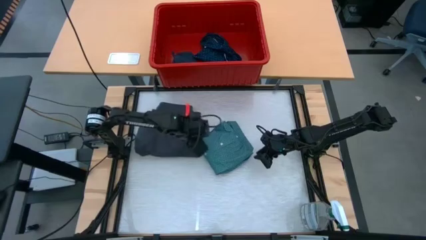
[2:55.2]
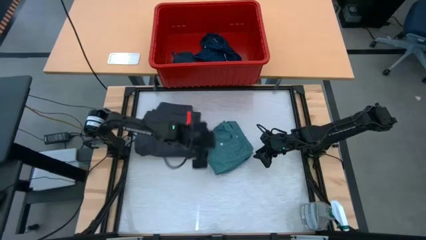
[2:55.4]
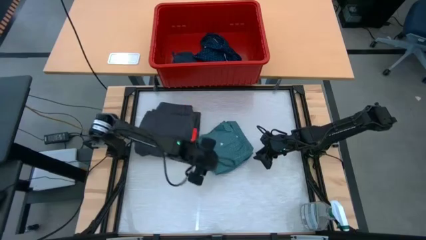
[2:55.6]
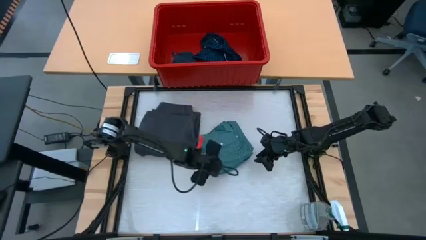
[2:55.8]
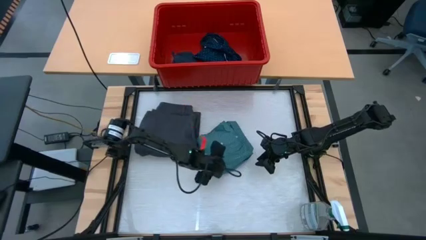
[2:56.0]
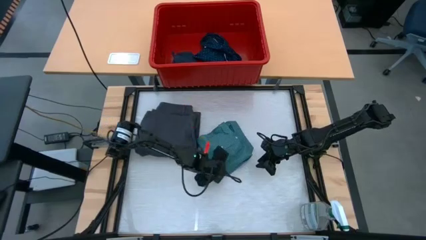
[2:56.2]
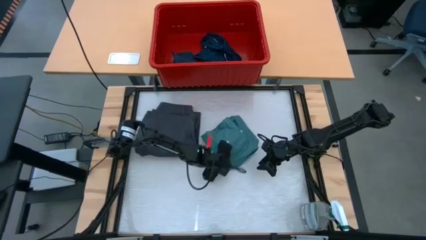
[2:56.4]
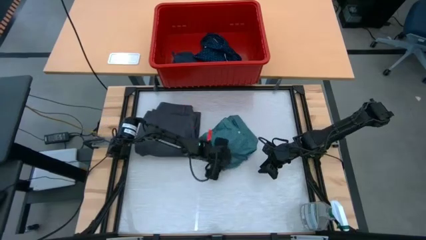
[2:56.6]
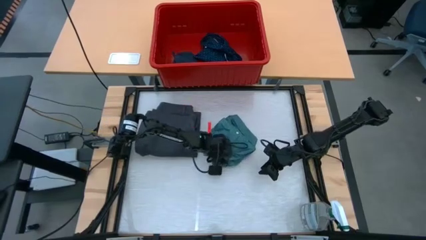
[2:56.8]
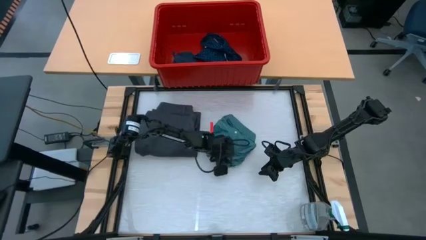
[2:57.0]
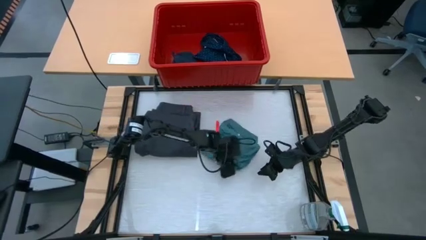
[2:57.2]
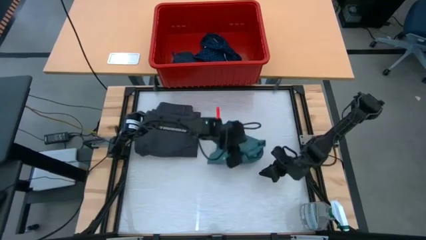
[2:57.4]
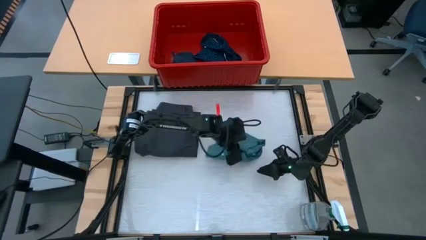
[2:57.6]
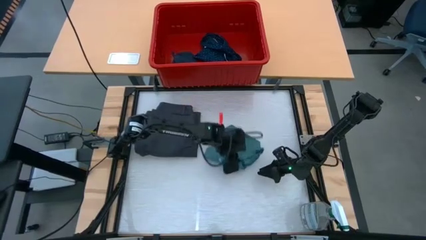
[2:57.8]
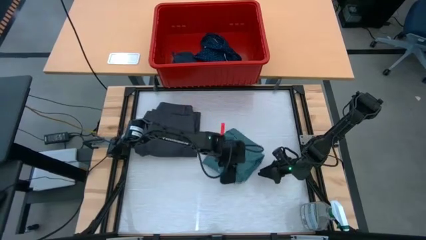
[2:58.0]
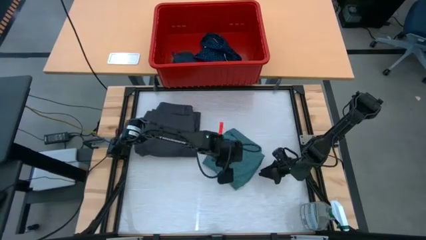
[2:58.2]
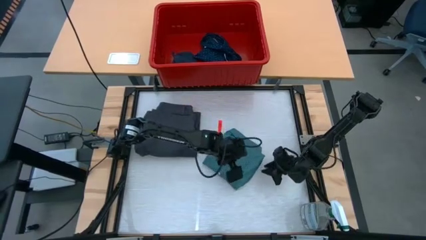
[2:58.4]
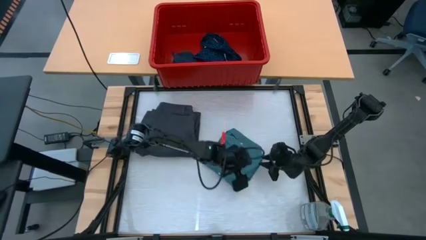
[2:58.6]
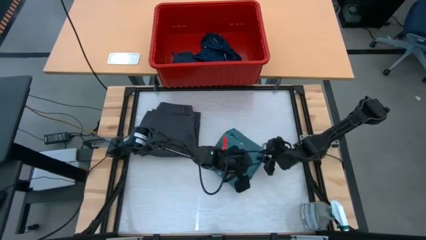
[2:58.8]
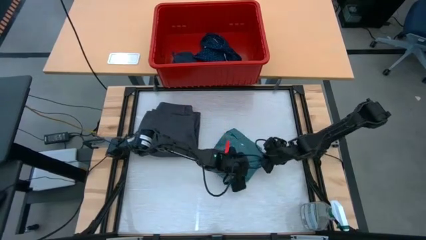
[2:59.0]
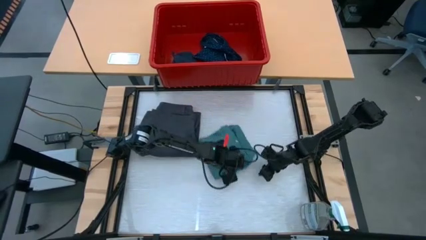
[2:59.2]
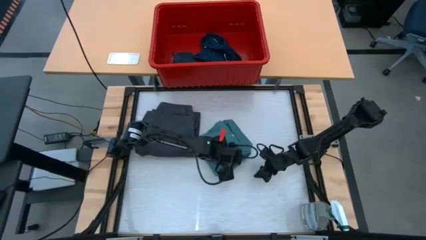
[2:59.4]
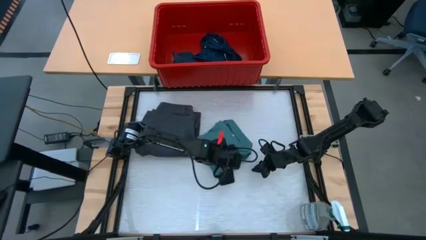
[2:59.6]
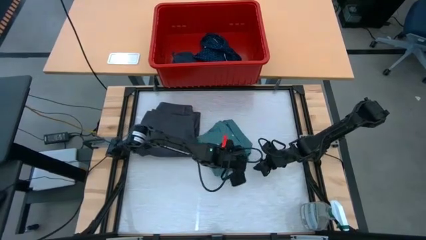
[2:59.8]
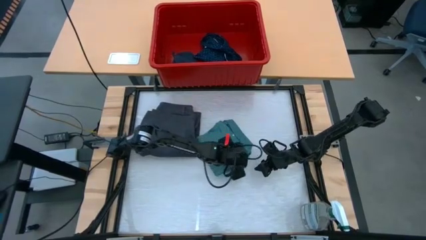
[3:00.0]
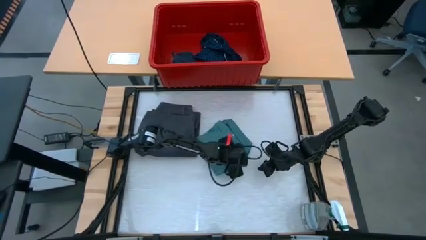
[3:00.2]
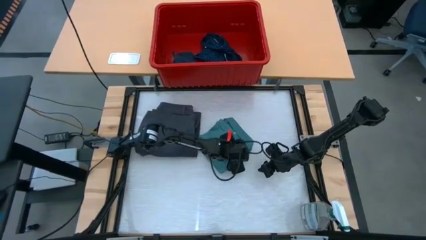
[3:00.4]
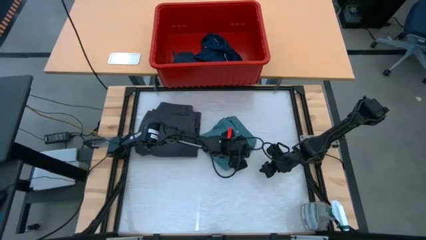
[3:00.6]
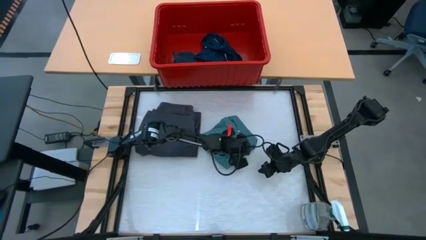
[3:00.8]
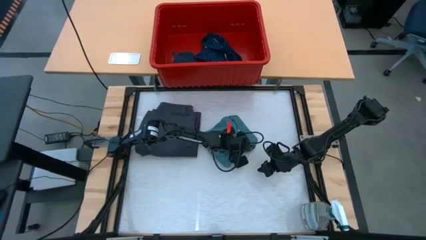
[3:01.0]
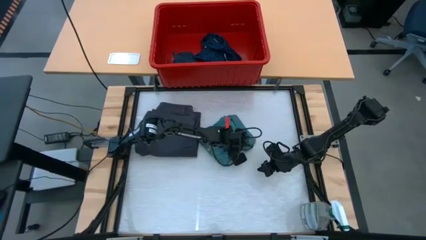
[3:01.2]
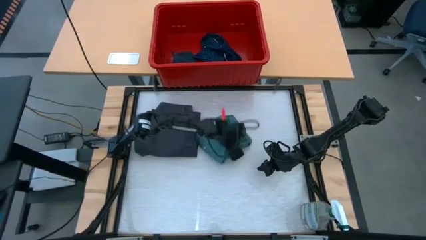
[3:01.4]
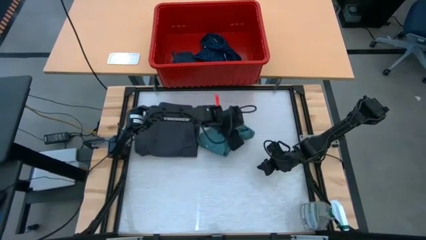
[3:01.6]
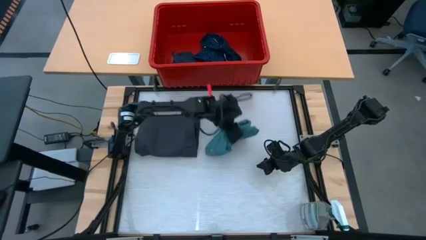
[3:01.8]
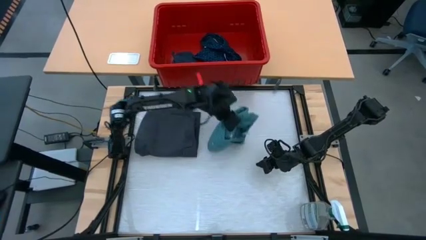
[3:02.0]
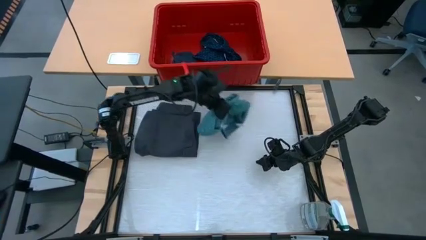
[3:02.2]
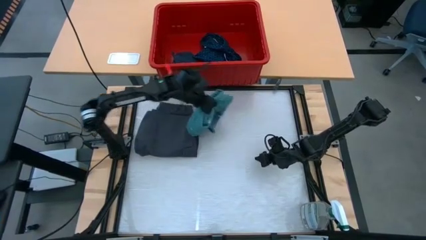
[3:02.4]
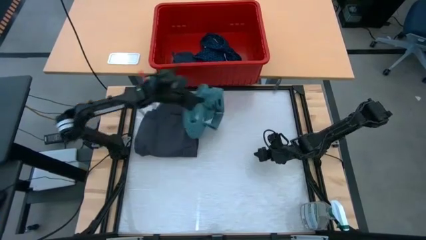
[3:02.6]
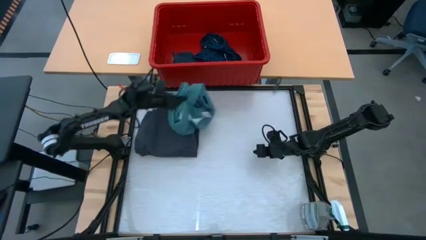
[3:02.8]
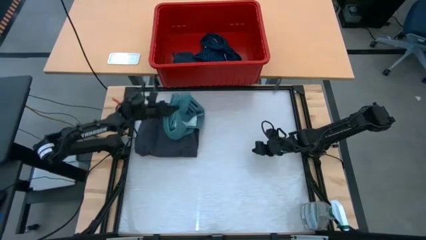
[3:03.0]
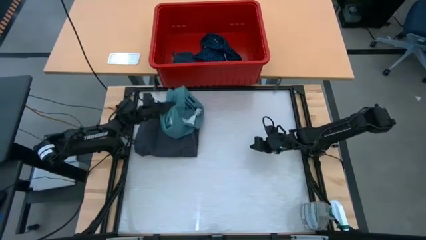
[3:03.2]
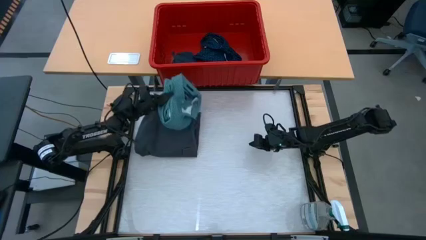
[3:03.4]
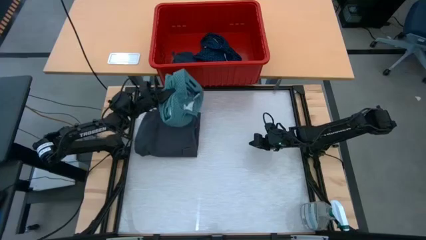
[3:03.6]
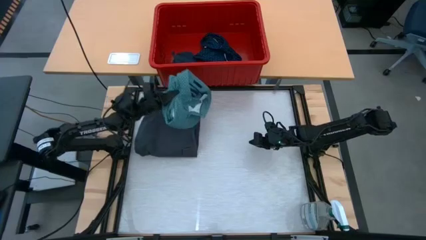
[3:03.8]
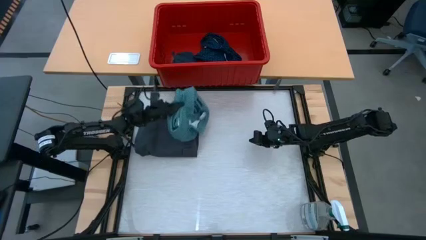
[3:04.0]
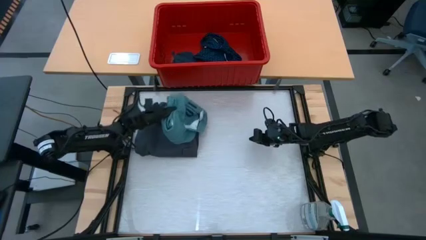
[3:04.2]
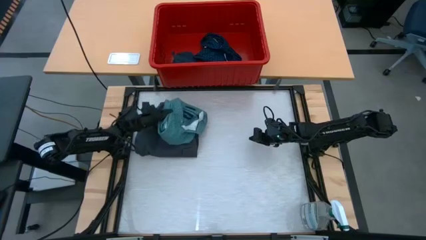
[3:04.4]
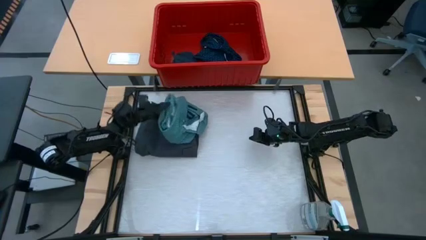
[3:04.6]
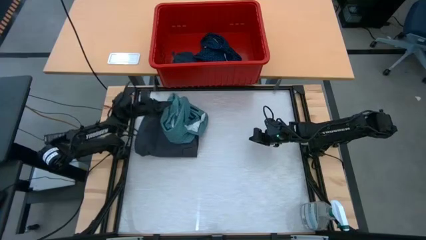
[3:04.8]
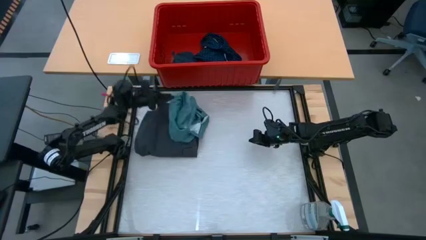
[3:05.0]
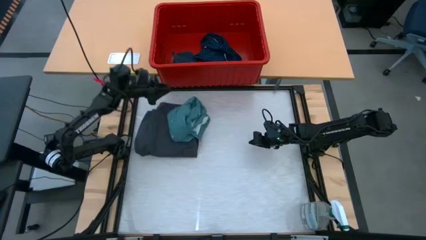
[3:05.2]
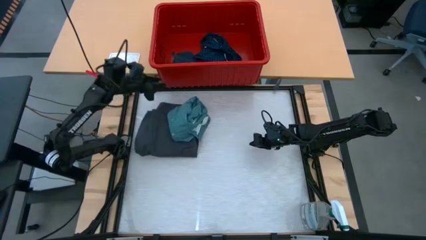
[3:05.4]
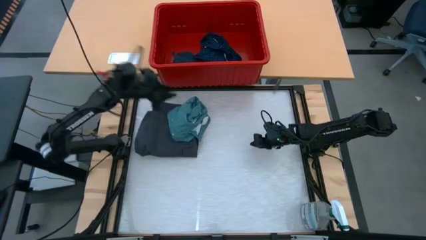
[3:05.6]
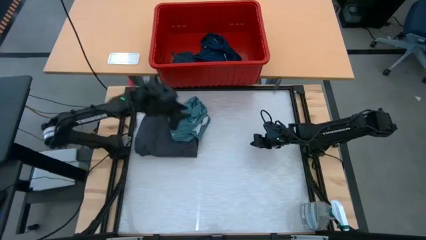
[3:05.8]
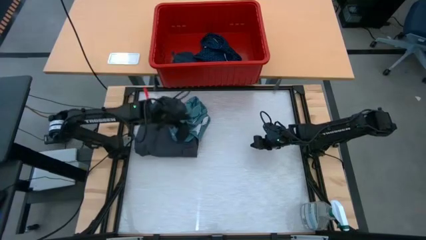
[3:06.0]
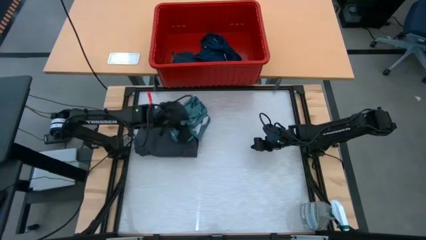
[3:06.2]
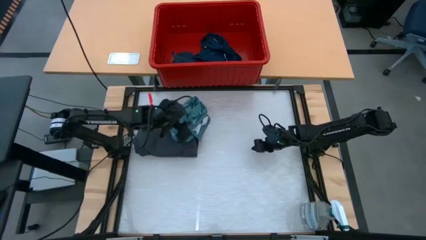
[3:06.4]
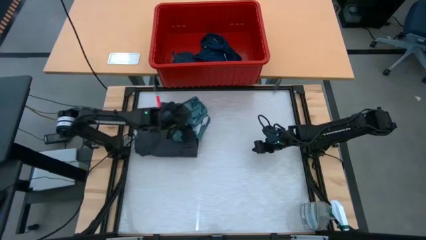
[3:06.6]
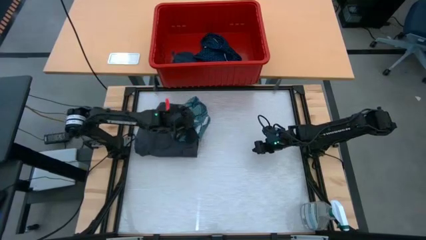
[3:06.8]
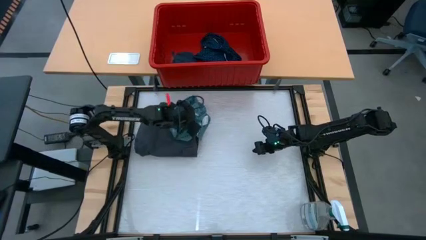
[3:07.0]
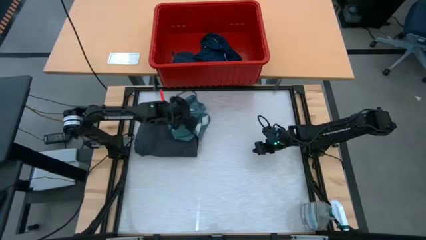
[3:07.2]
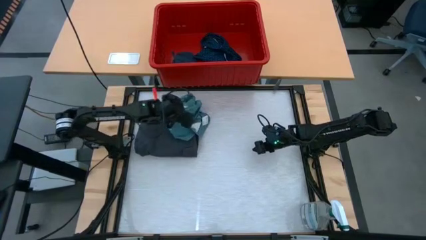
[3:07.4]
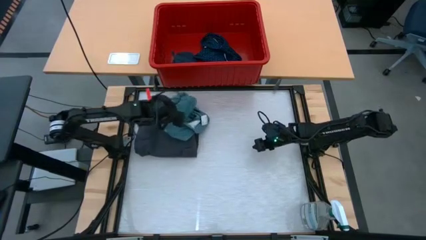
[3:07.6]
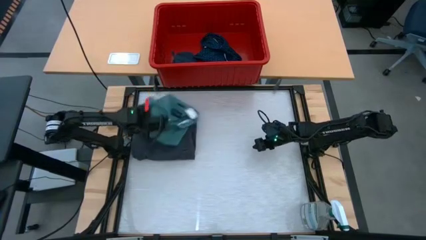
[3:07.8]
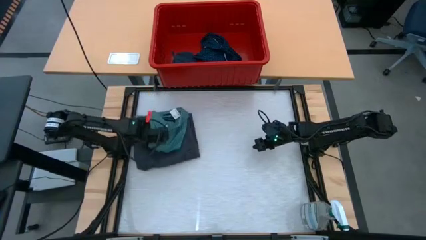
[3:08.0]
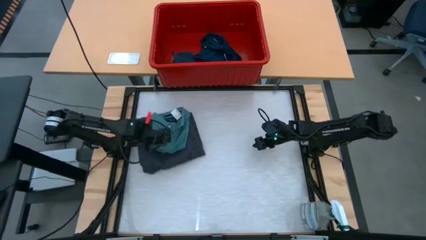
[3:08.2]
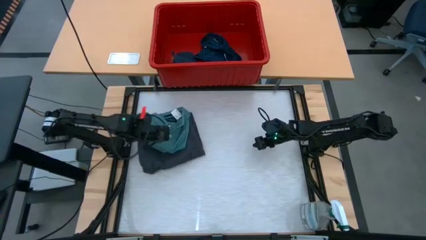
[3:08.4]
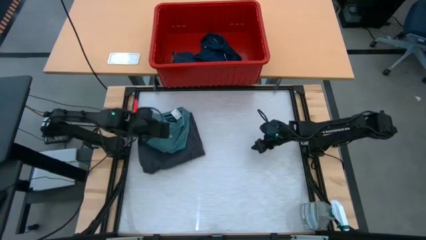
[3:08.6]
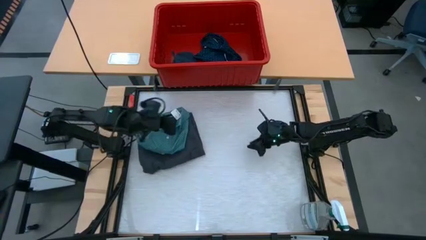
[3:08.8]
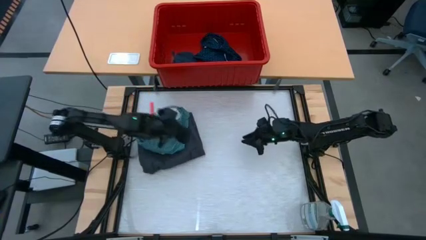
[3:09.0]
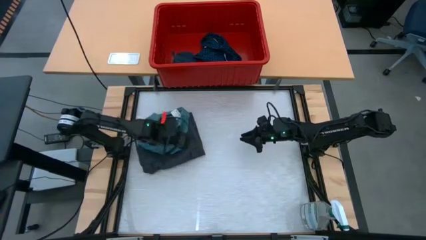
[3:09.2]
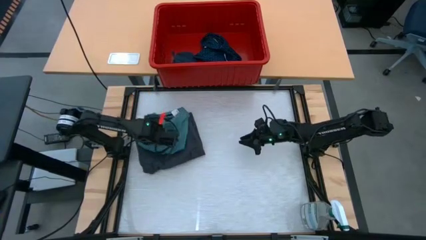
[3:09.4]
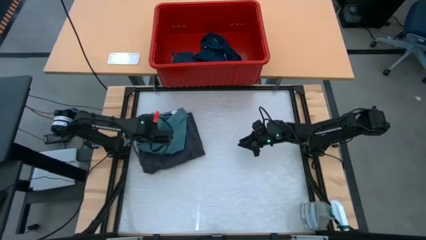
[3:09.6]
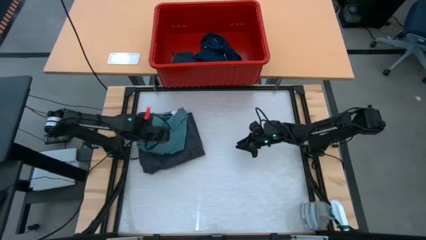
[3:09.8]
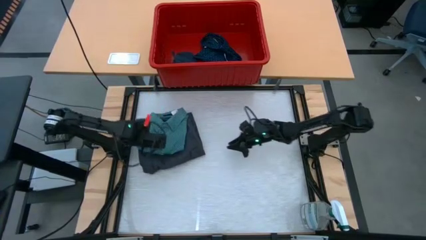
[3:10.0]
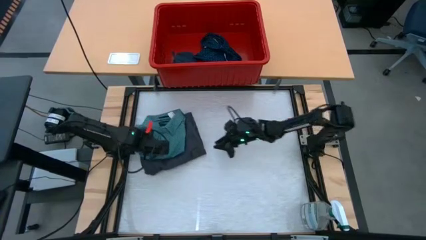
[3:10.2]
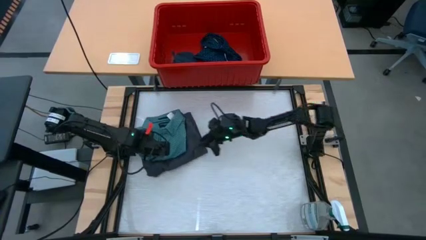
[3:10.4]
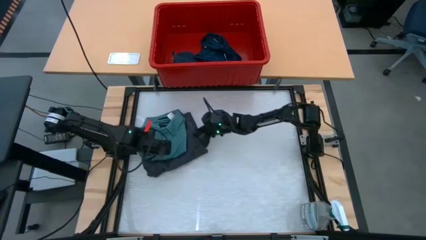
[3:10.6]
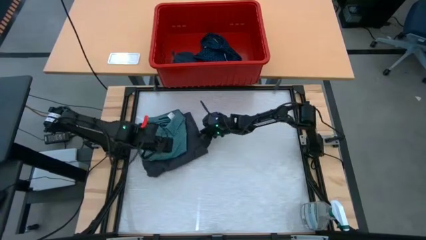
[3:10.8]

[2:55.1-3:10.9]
Task: Fold laundry
Stack the dark green polo on top of the black shorts

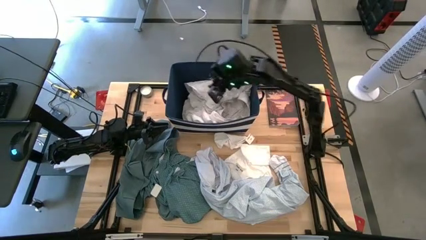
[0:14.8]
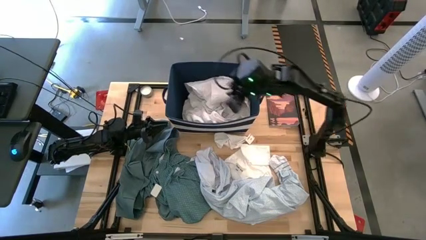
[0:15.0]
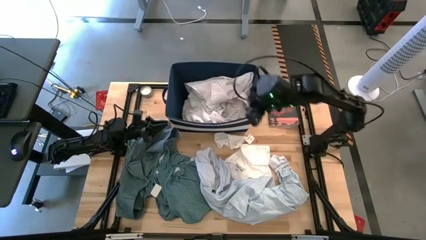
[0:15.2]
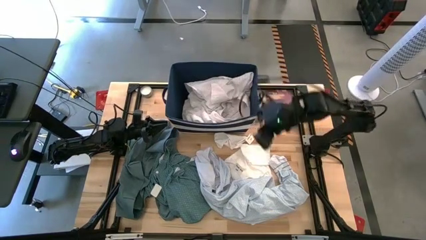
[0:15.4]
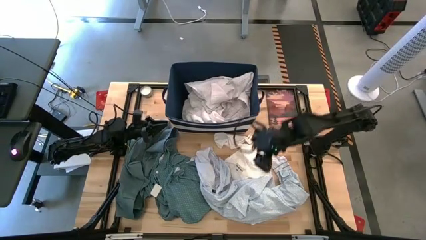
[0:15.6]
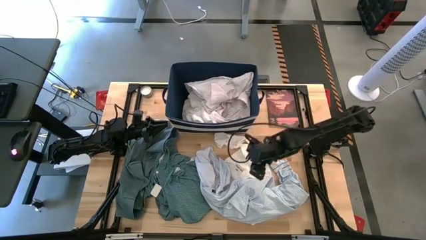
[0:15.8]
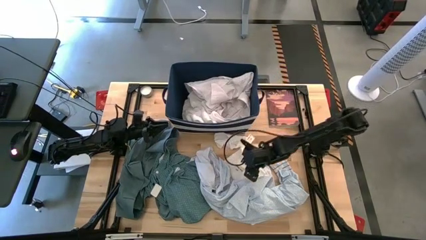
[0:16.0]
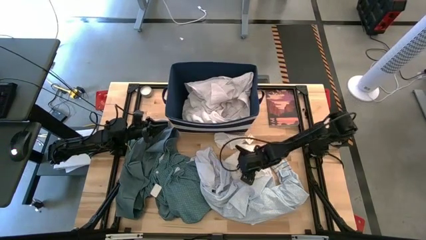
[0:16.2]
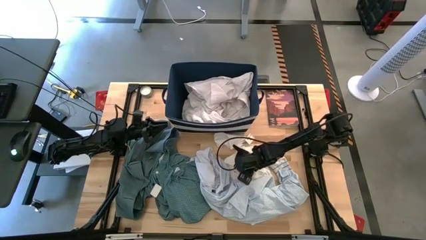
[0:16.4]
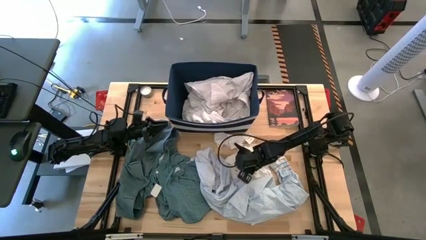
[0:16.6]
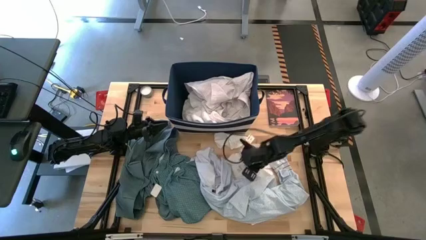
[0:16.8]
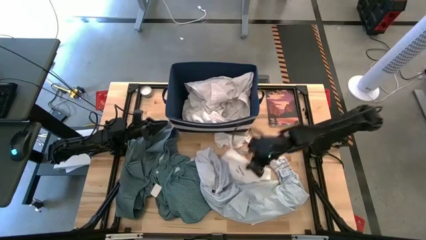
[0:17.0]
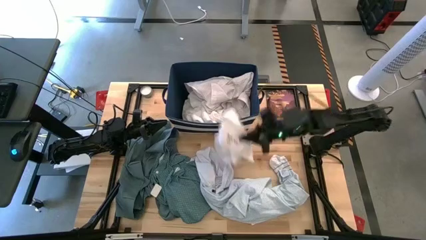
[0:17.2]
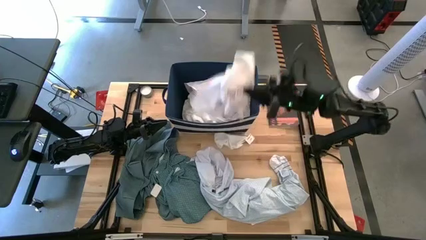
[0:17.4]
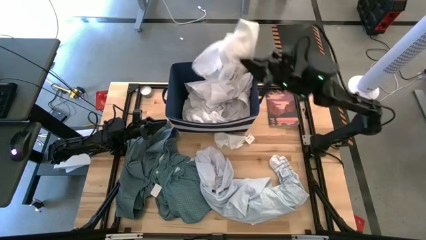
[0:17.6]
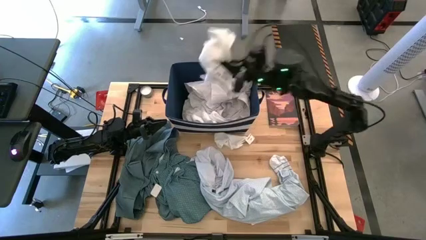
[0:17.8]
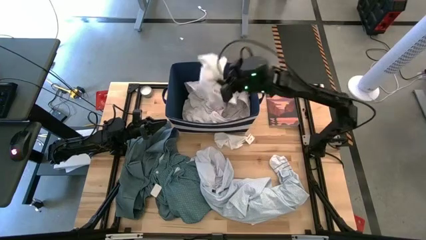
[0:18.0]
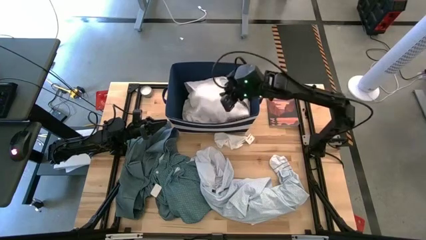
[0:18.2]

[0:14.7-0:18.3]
Task: Sort clothes
Put the white pants into the blue bin
